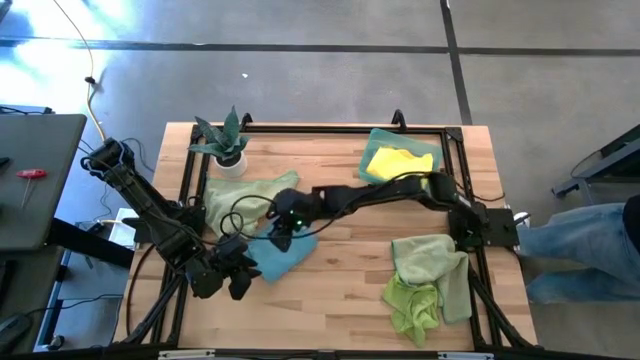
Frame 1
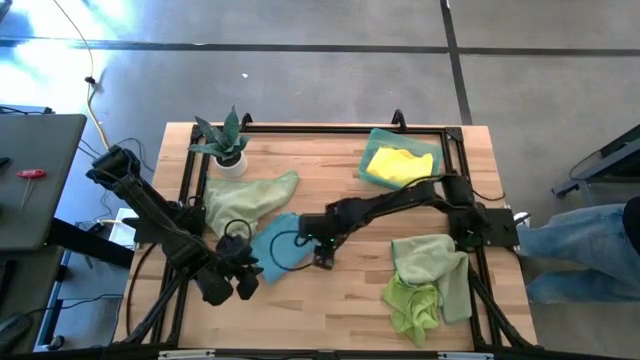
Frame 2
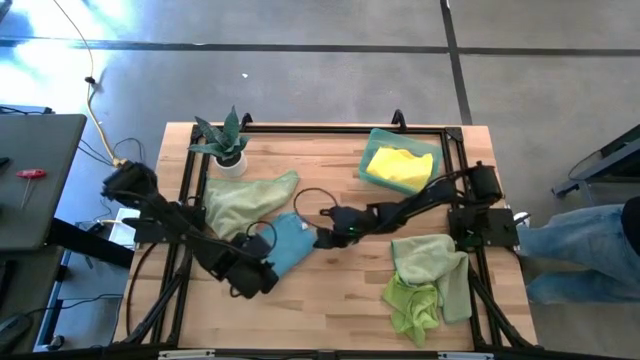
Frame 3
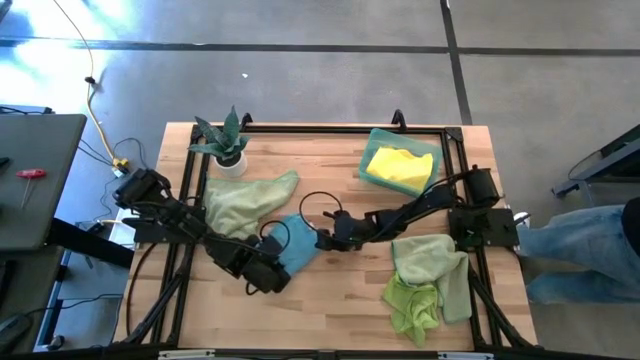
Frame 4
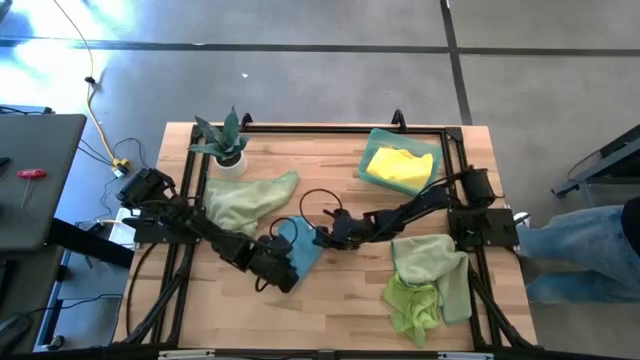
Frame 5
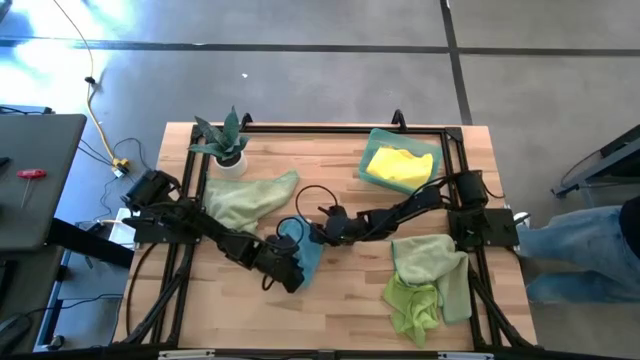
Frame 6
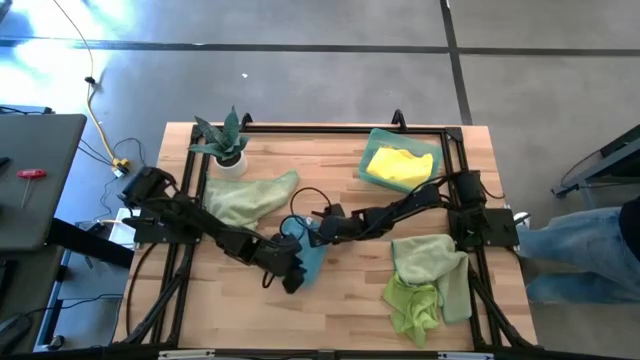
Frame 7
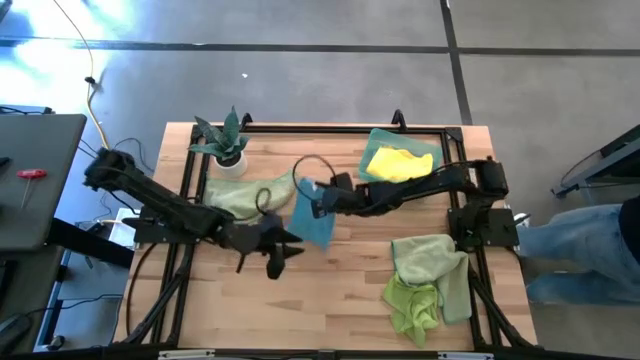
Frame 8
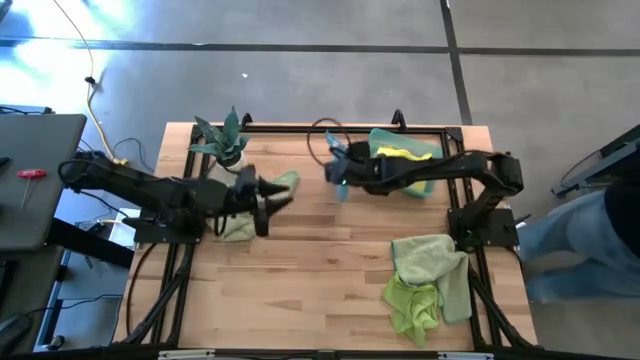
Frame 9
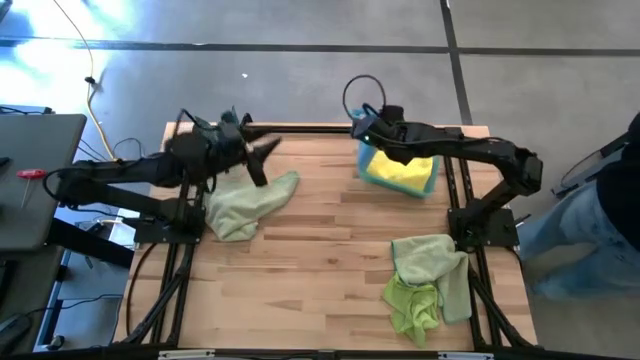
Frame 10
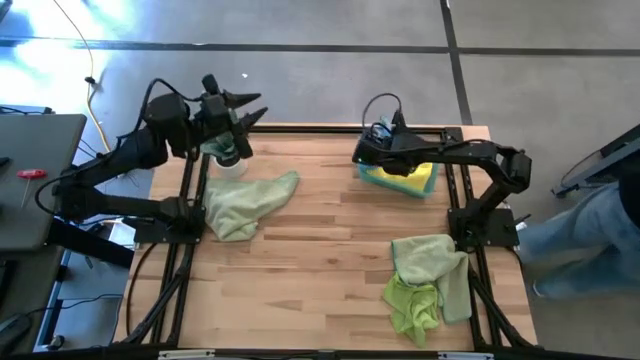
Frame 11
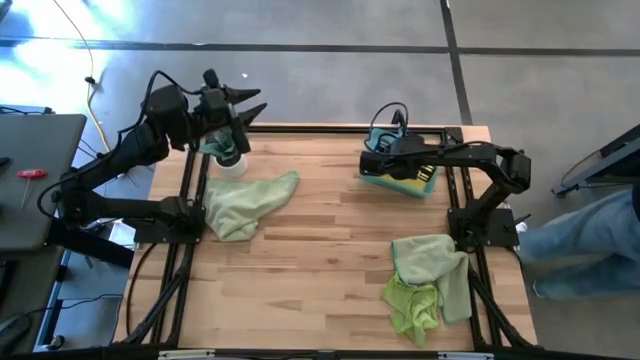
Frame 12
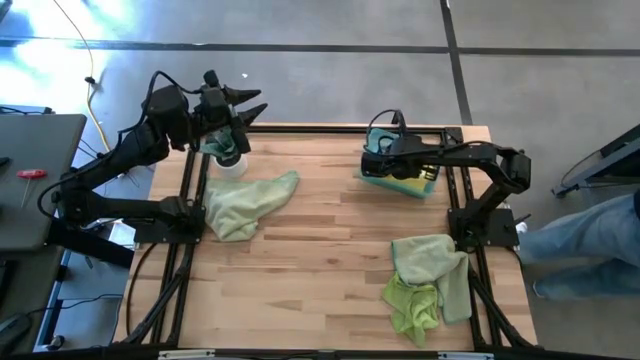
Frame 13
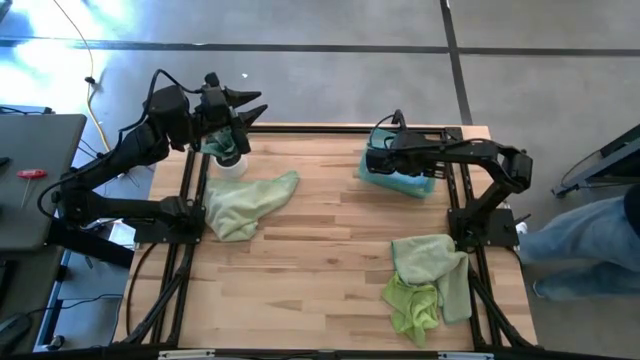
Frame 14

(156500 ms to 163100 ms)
Task: Fold microfiber towels
Stack the folded blue microfiber cloth on top of the folded yellow microfiber cloth

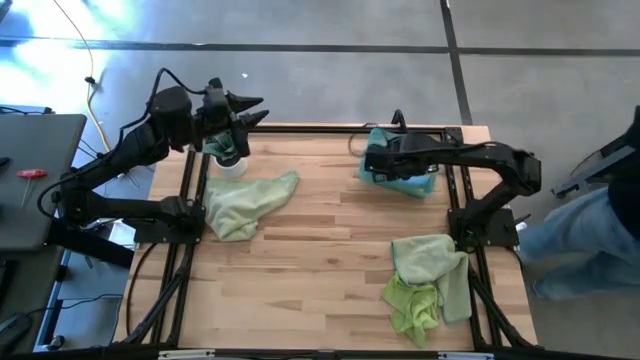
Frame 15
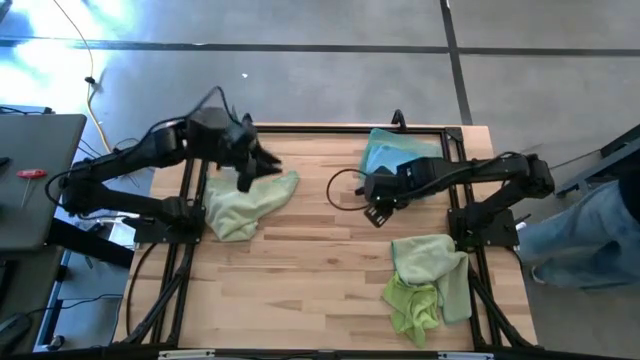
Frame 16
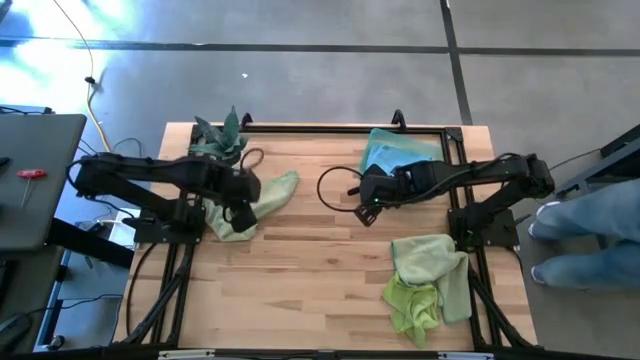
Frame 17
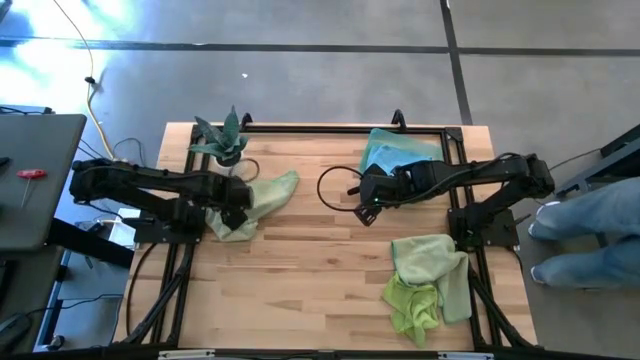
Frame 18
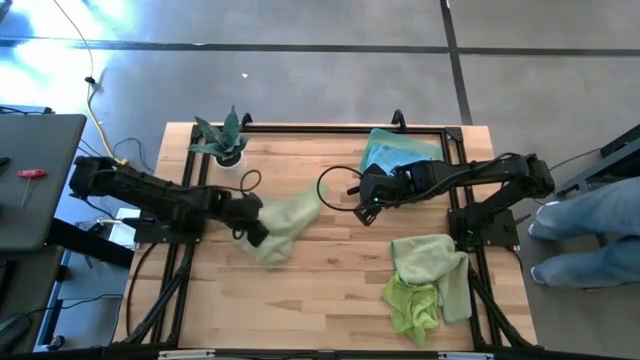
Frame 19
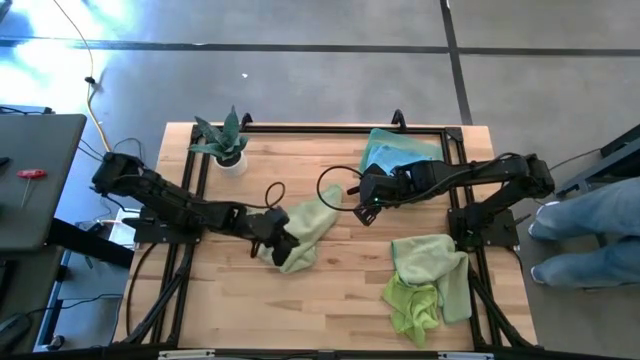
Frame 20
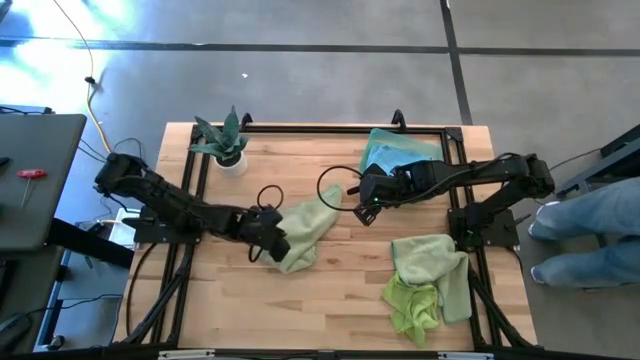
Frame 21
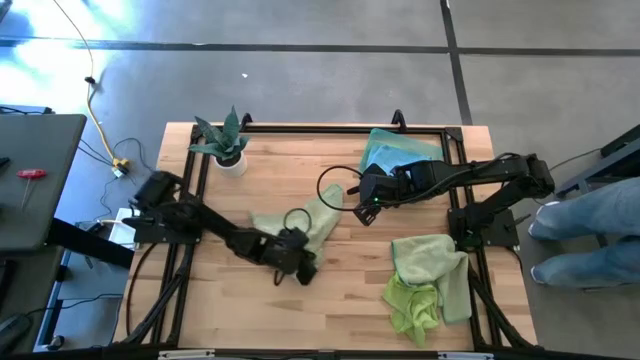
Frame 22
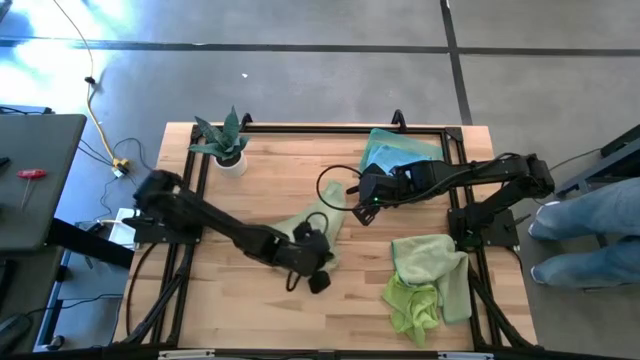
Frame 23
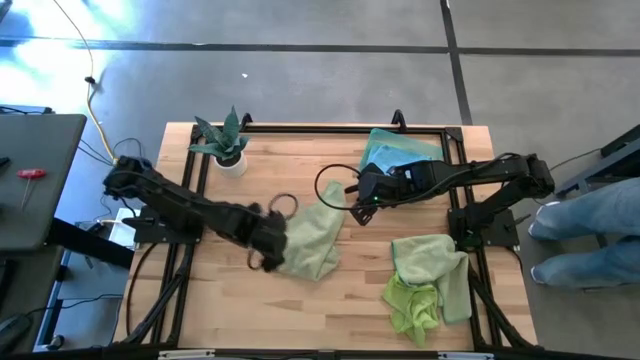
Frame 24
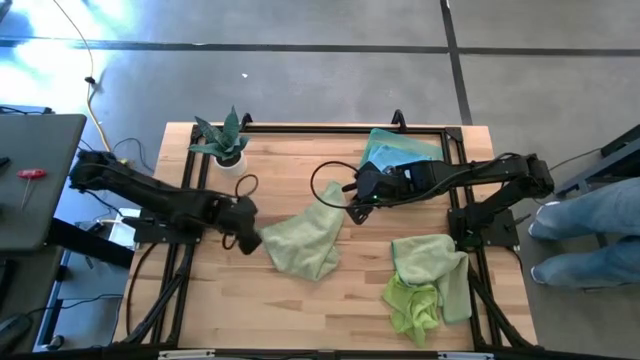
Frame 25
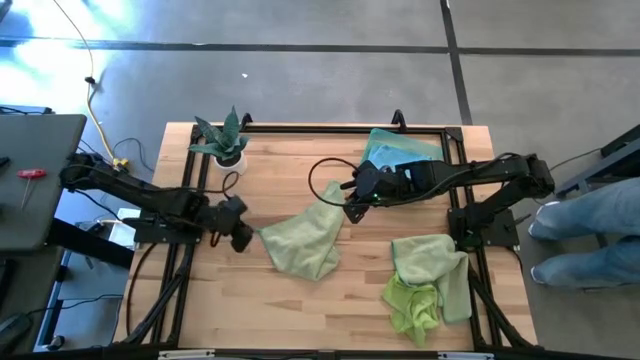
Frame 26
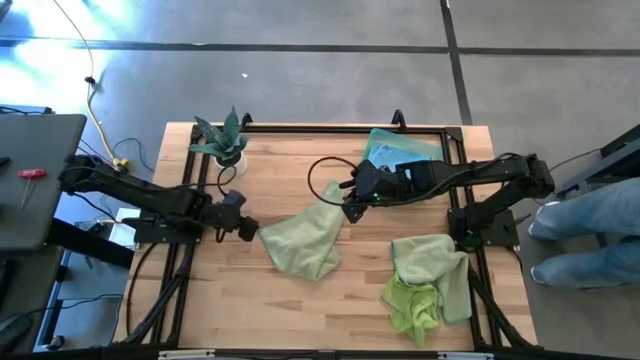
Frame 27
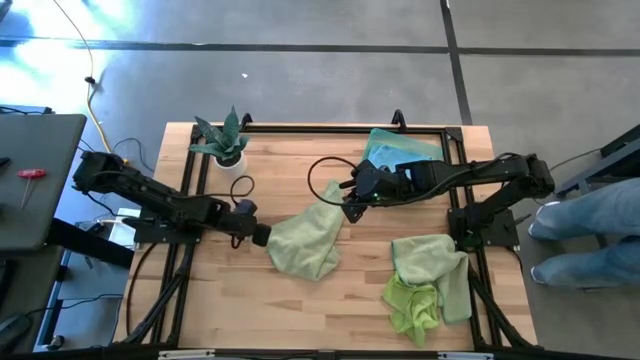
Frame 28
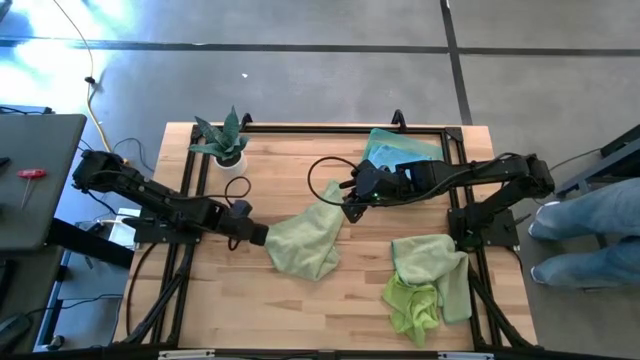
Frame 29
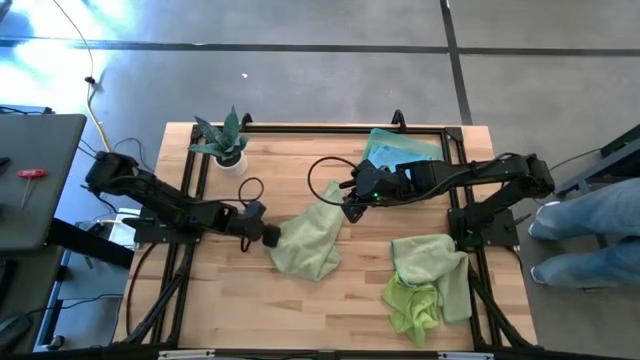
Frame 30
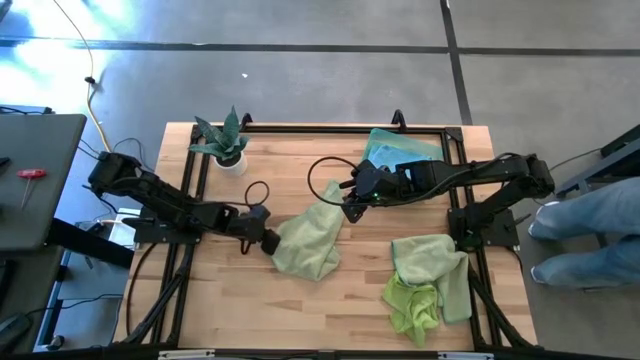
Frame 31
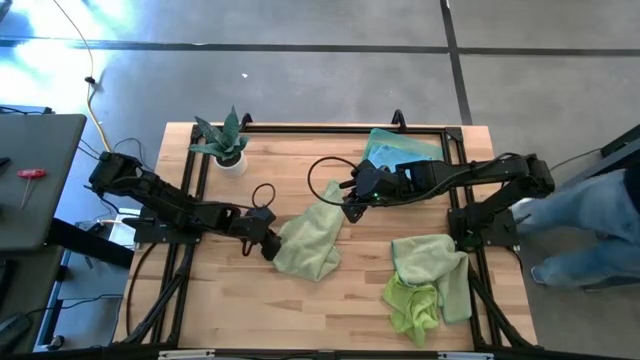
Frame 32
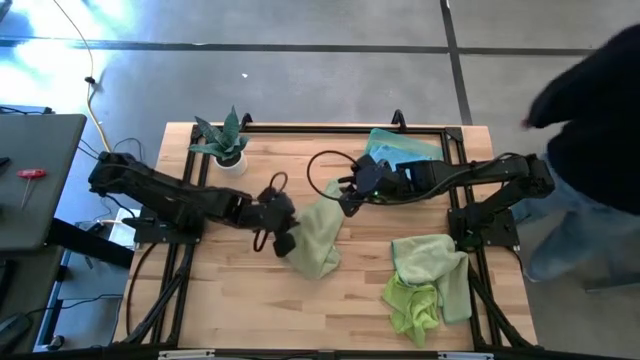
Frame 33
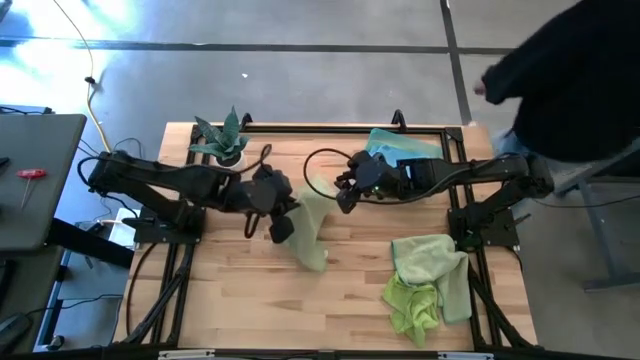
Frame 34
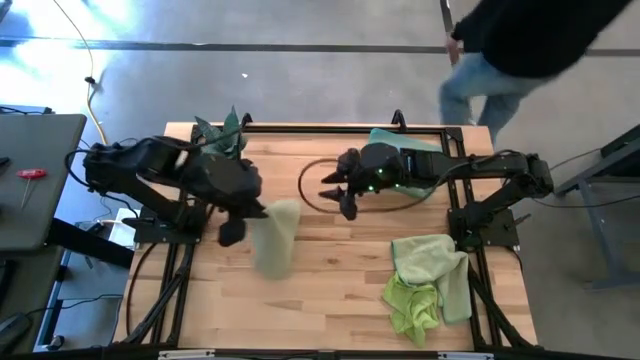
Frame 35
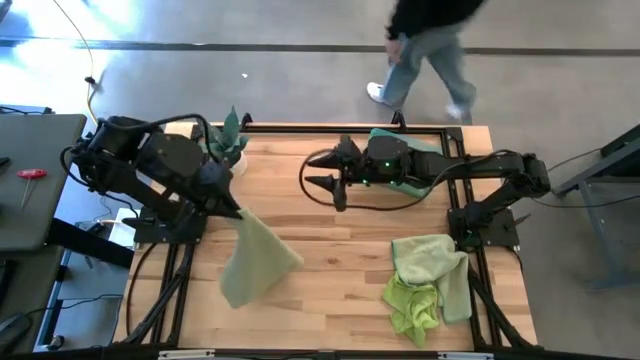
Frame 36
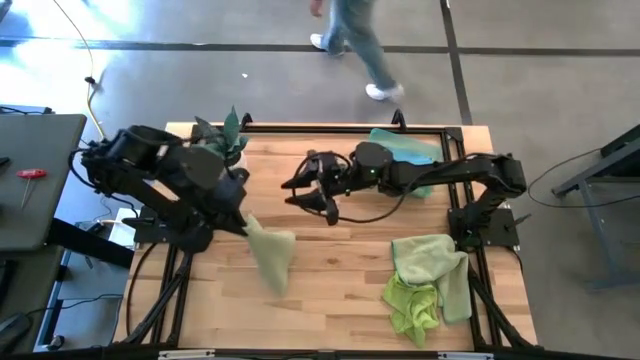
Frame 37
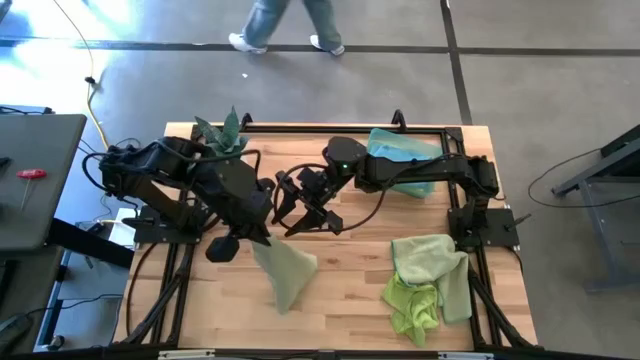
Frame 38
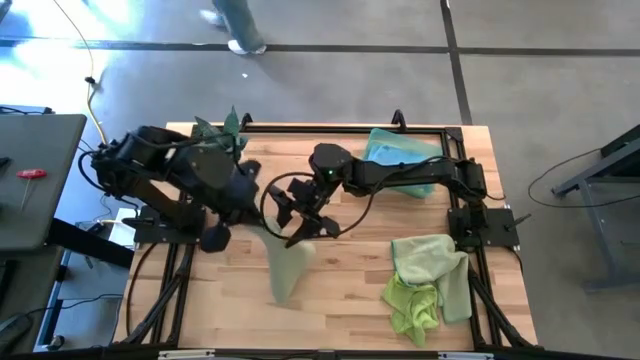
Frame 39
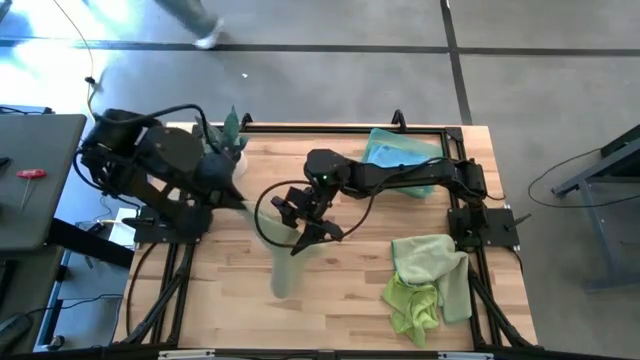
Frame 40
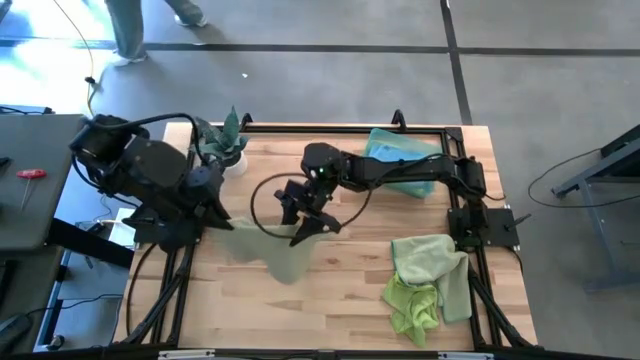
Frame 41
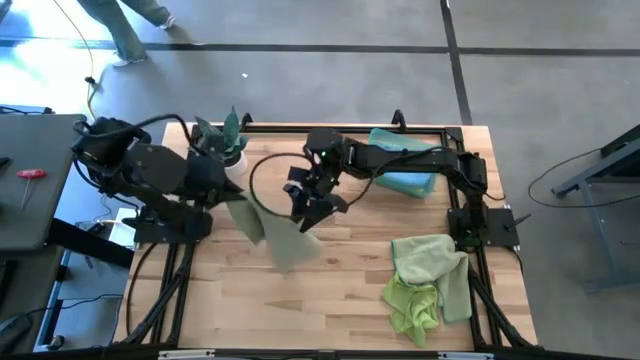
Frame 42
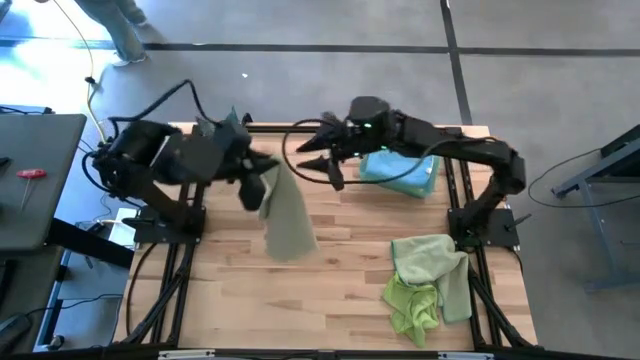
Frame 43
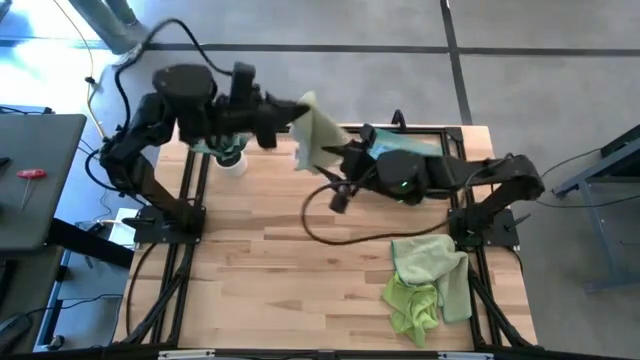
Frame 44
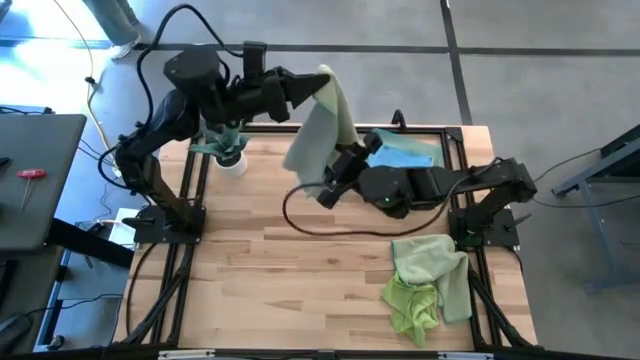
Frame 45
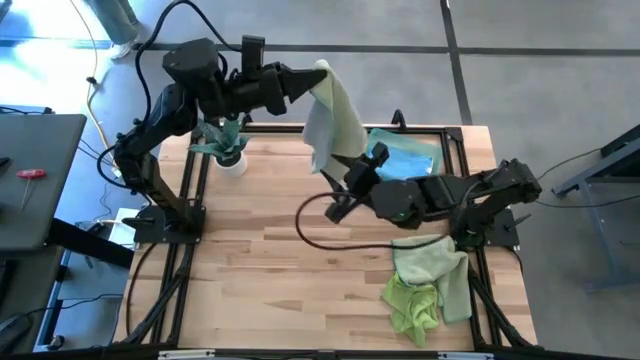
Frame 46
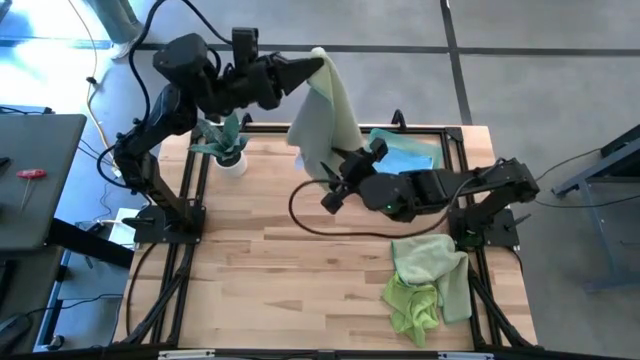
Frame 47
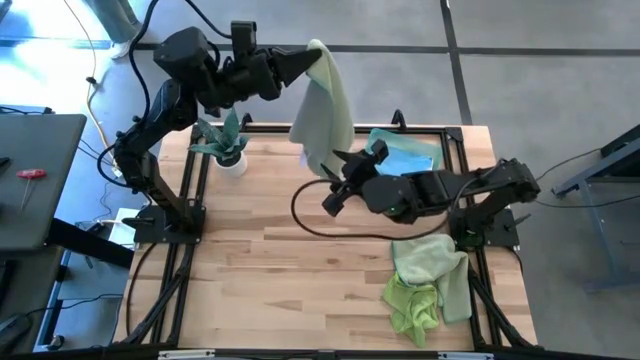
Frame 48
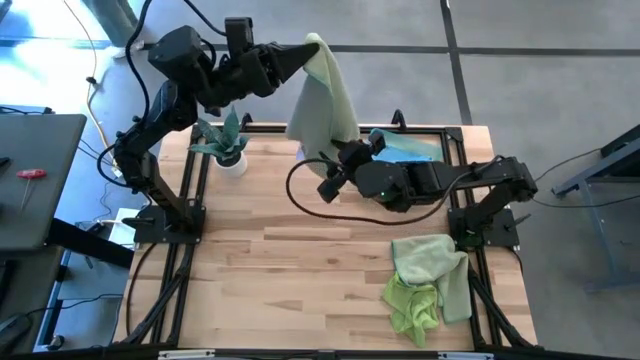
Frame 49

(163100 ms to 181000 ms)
Fold the left green microfiber cloth
